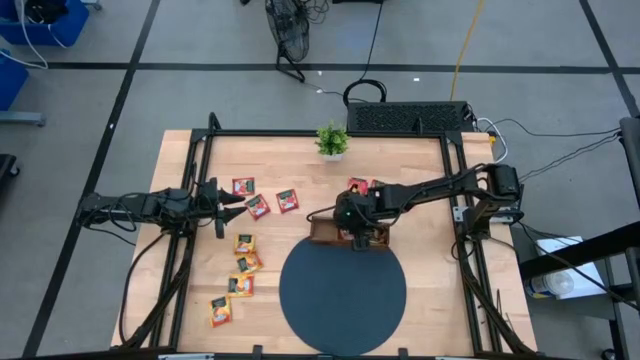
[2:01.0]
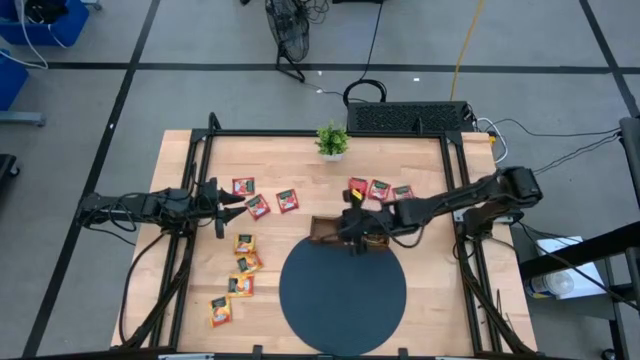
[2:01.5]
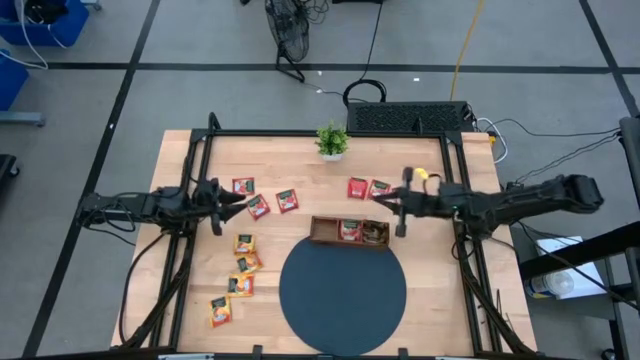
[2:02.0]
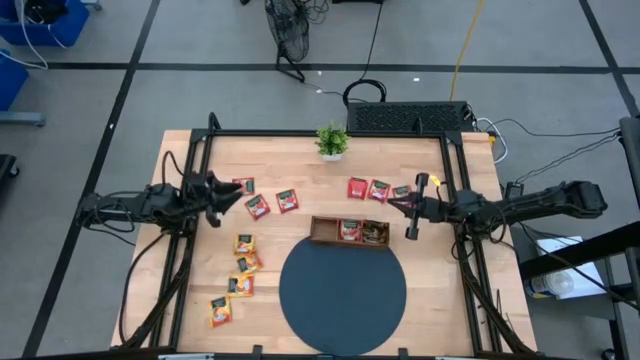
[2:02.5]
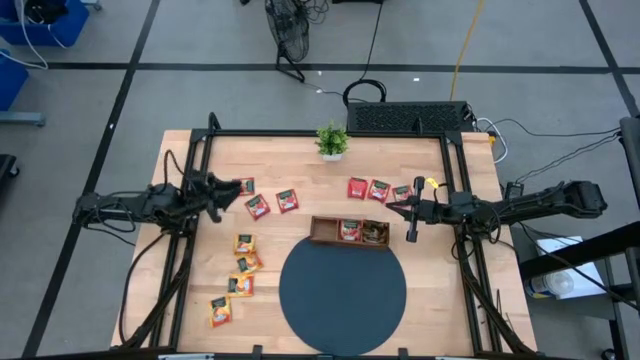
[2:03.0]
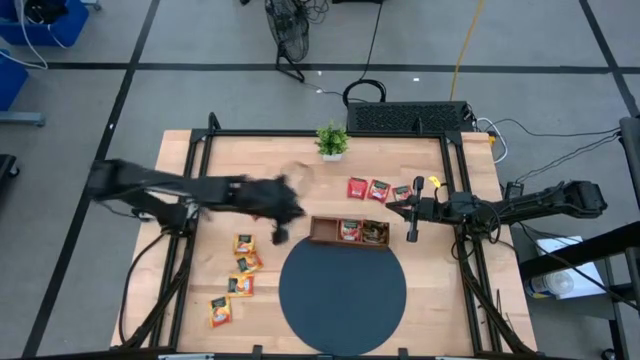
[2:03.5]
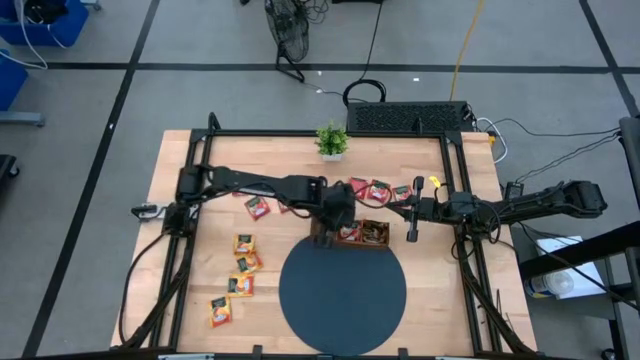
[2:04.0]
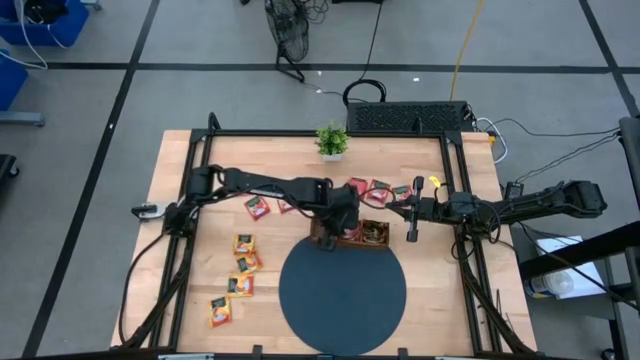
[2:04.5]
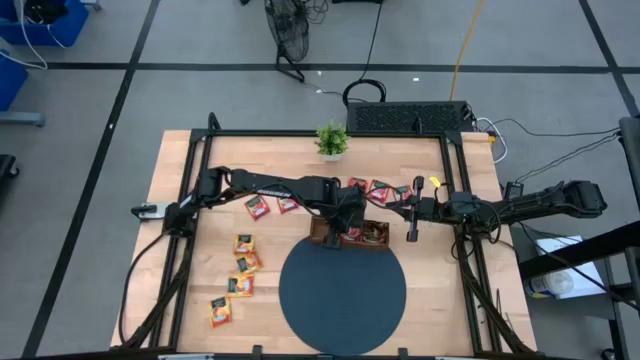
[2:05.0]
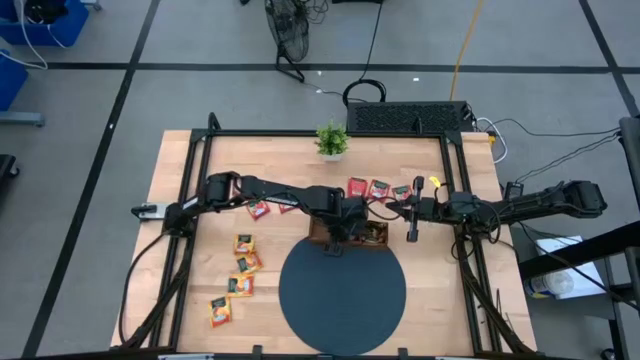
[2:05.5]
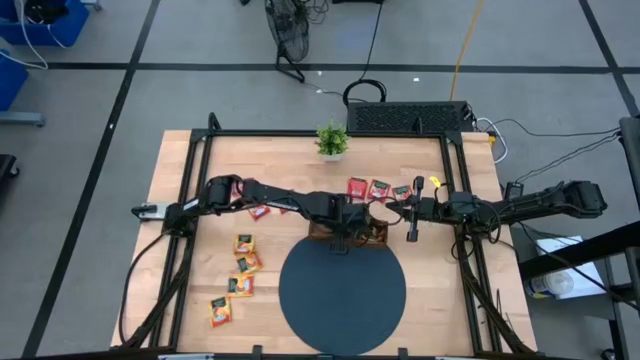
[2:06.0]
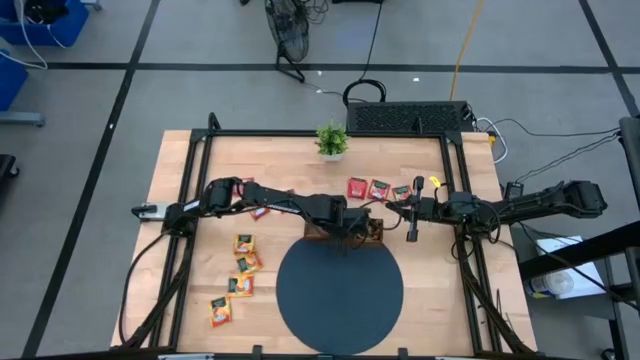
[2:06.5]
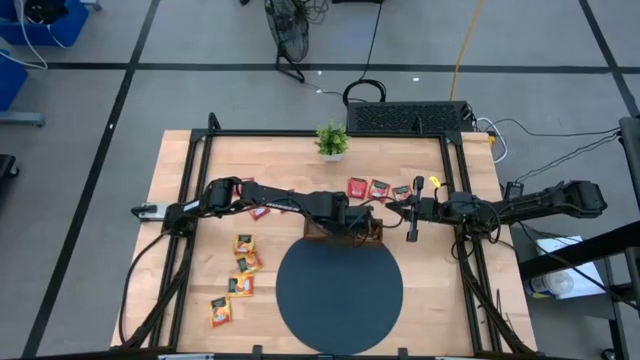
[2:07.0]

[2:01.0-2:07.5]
Task: Pick & Place Tea
Put the red tea bag into the middle slot of the wooden organizer

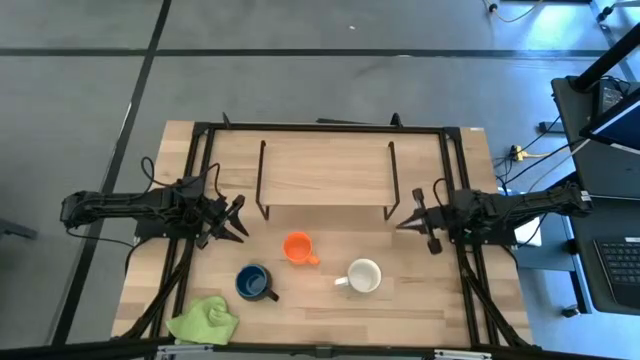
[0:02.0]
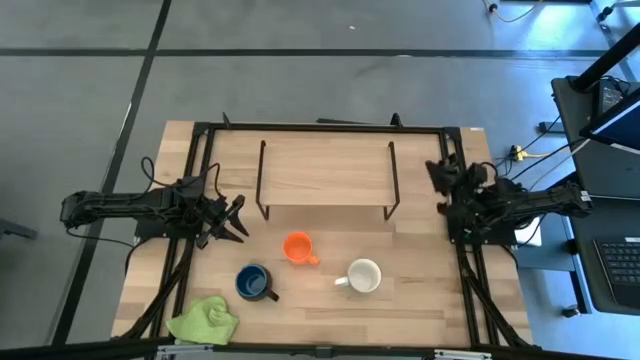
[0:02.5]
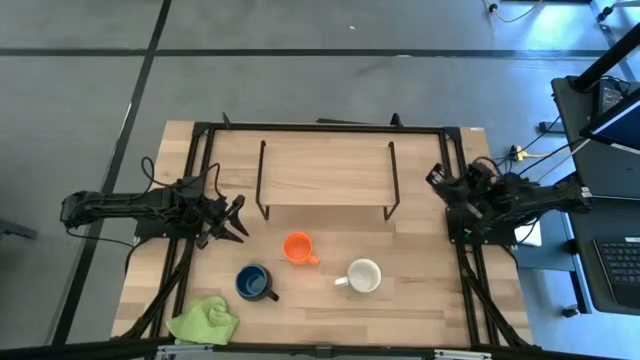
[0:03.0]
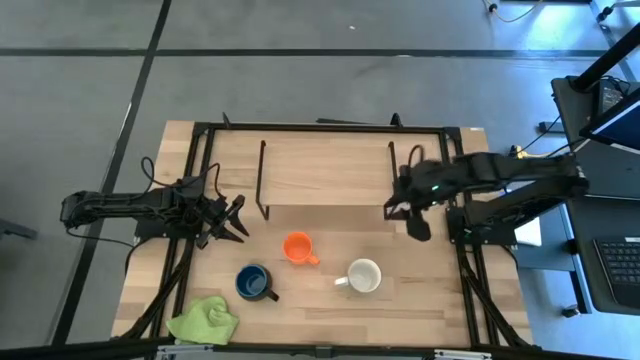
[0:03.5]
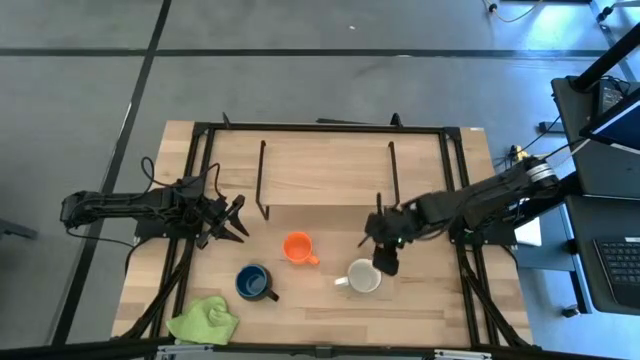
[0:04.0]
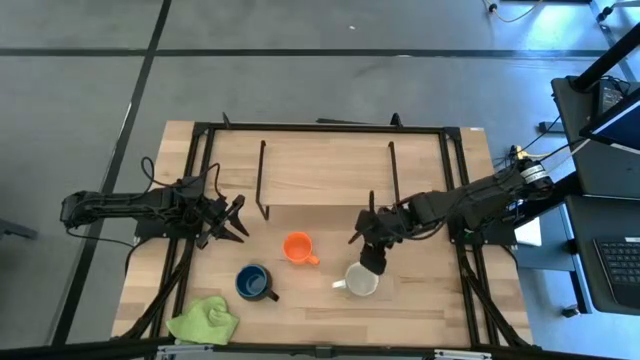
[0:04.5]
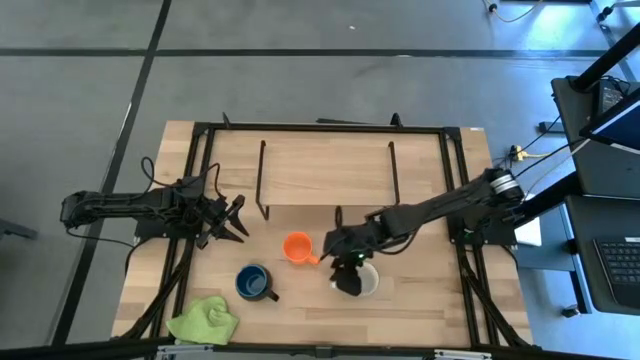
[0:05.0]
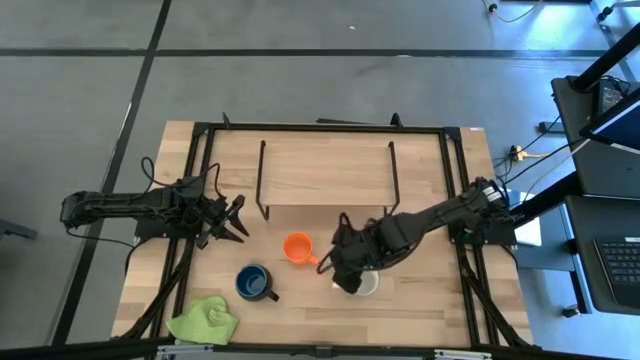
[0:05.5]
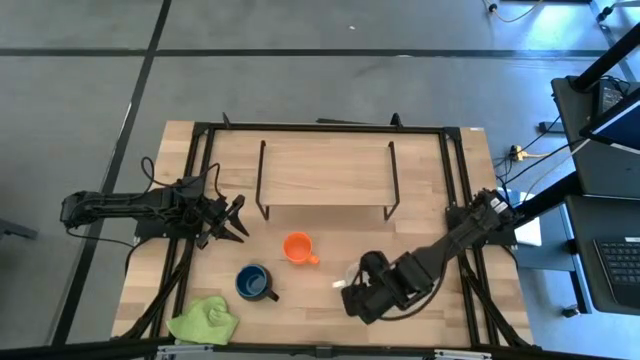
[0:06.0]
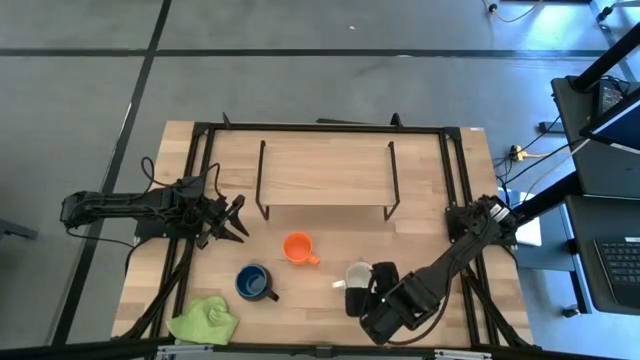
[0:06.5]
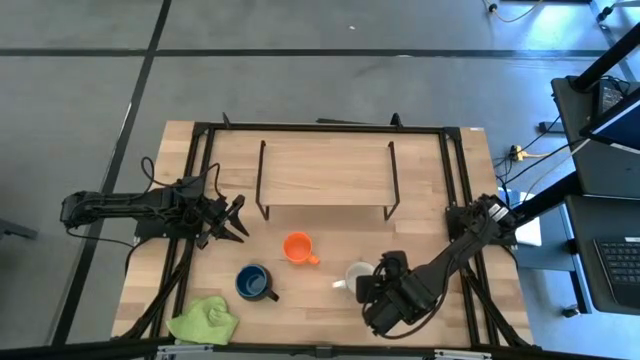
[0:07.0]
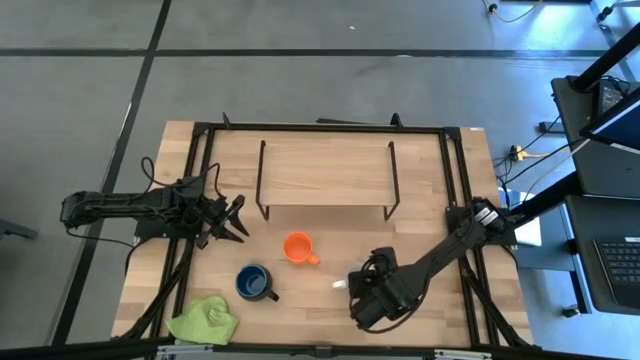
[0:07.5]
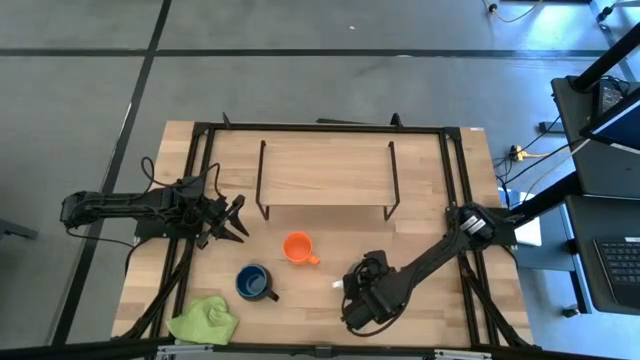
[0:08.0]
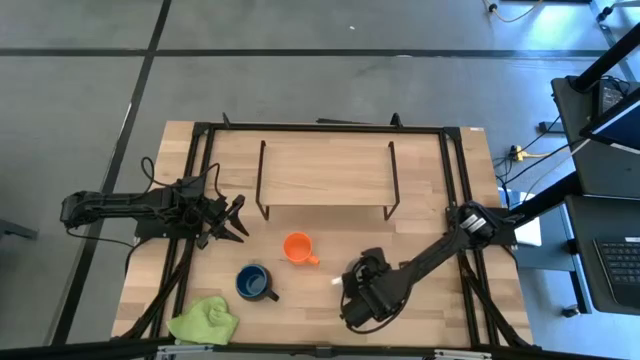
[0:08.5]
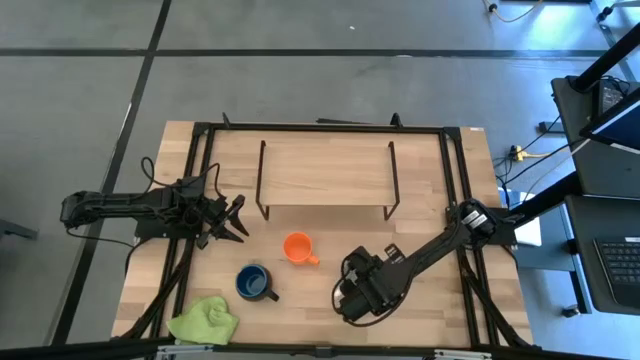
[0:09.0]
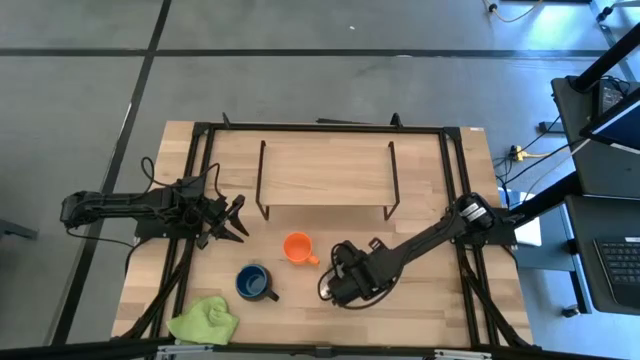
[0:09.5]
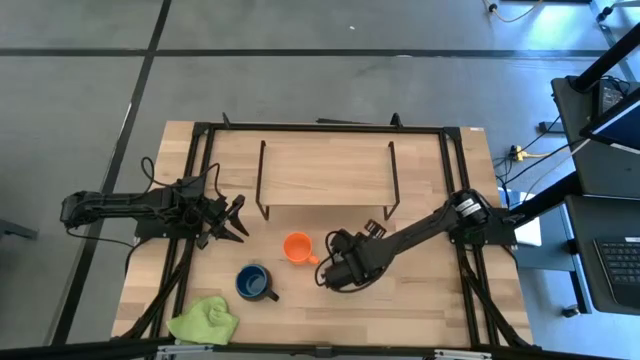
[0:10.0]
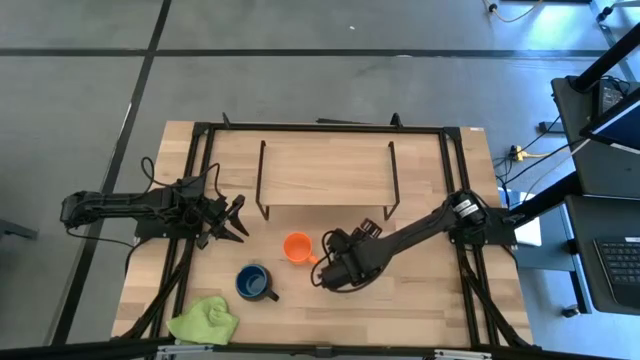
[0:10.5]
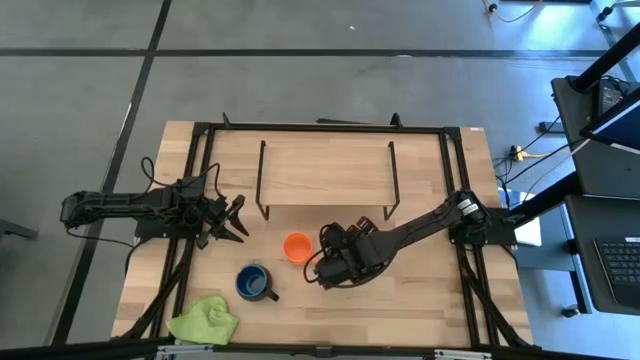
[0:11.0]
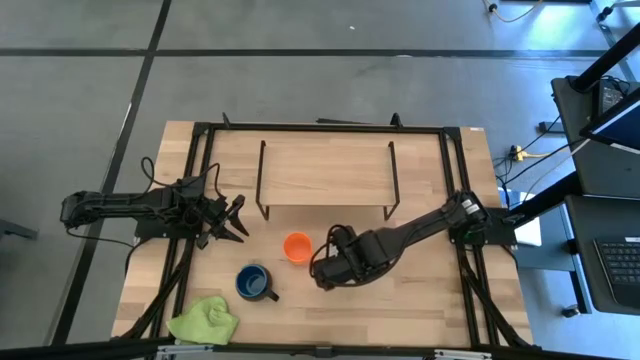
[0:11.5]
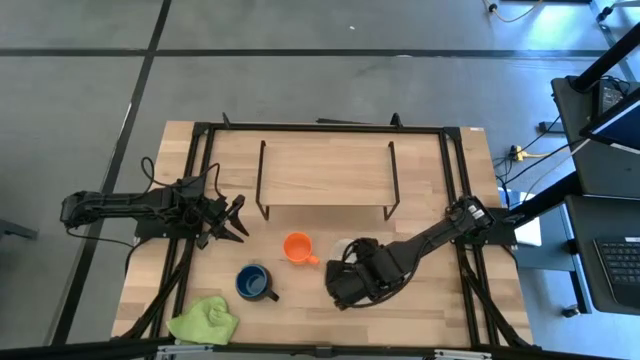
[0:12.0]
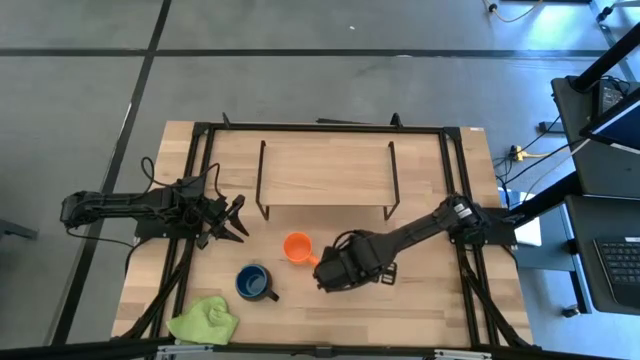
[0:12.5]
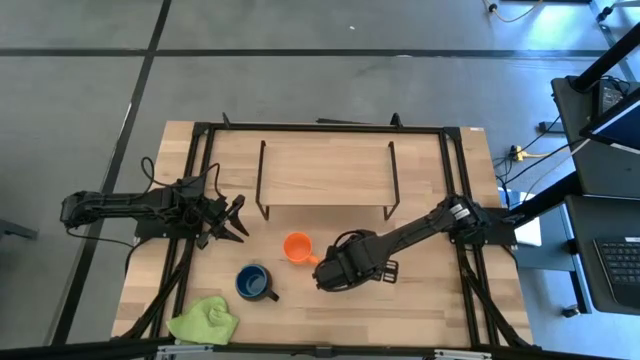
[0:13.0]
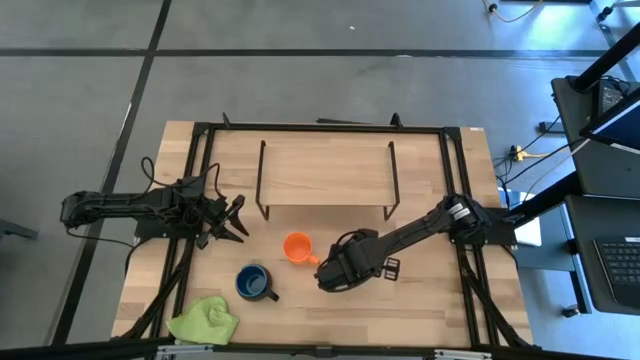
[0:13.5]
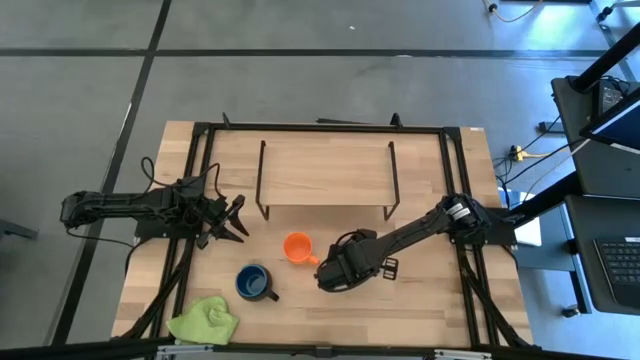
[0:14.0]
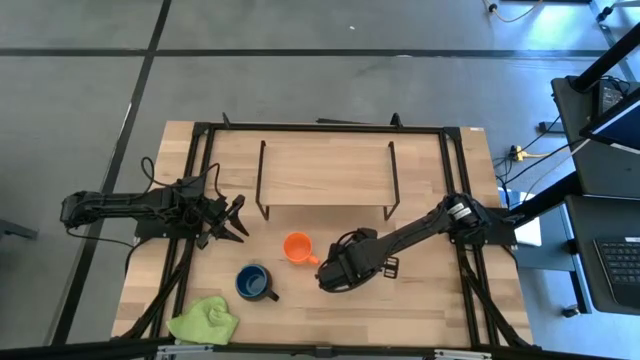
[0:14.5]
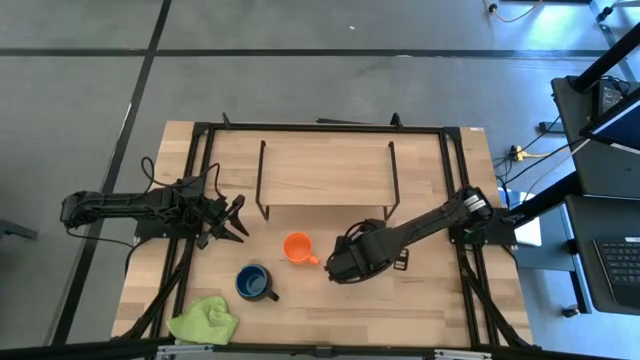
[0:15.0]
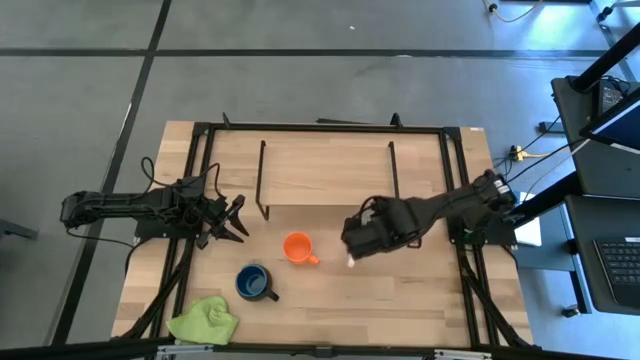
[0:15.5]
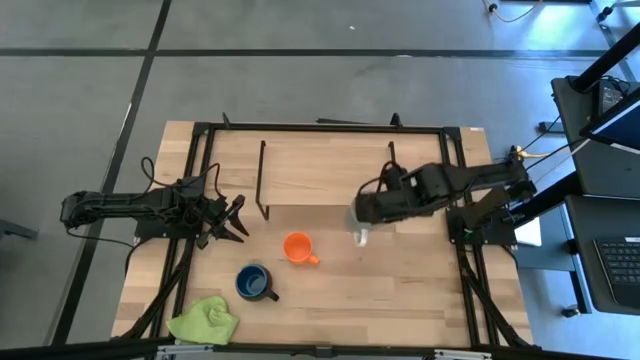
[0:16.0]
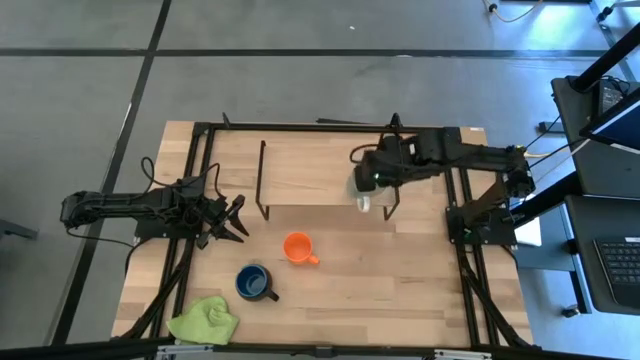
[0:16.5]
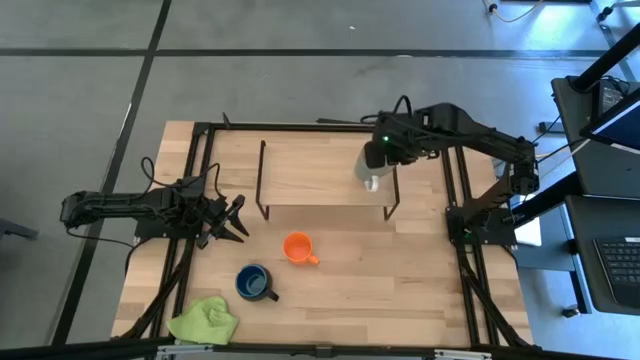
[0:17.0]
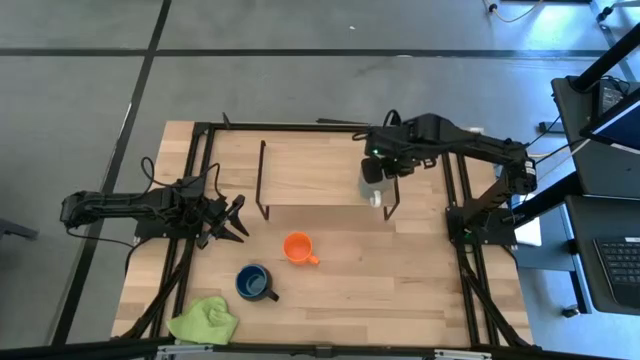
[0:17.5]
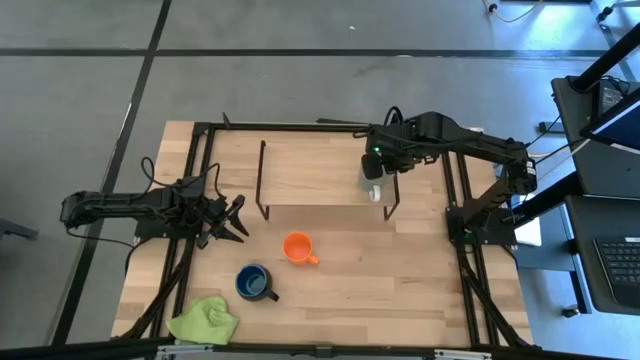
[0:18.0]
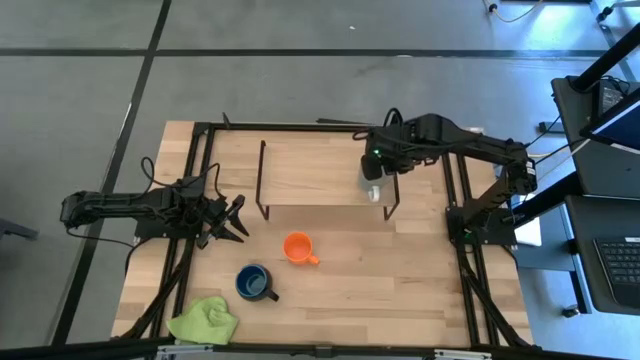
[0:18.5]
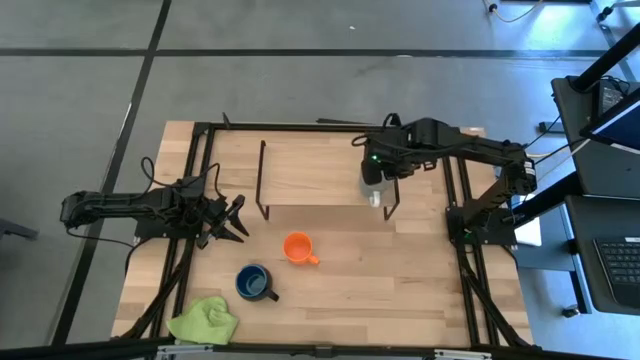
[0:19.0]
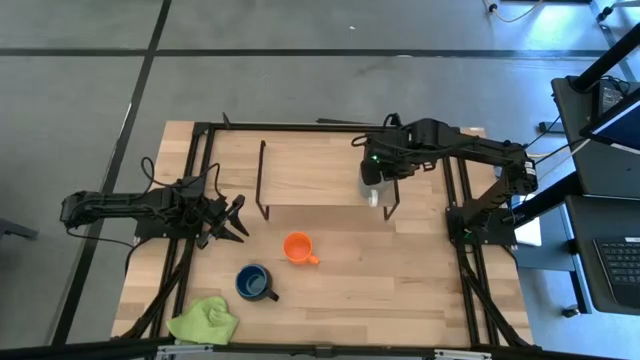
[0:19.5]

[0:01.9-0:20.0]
Task: Stack small to large cups/mugs on shelf
Put the white mug on the shelf
